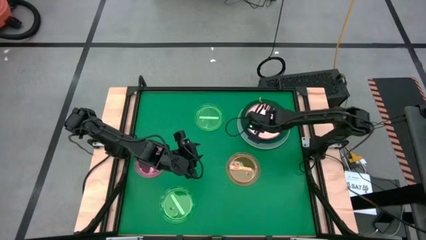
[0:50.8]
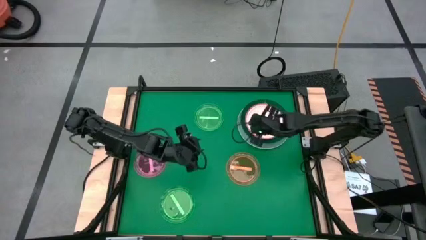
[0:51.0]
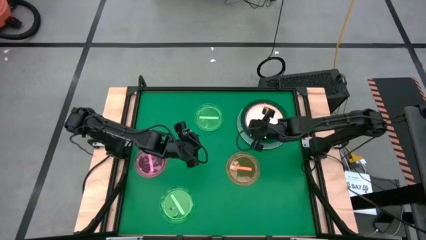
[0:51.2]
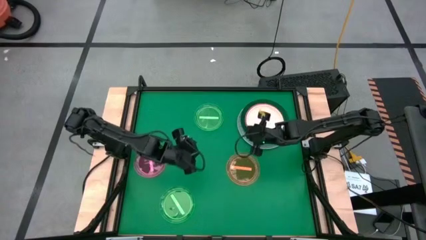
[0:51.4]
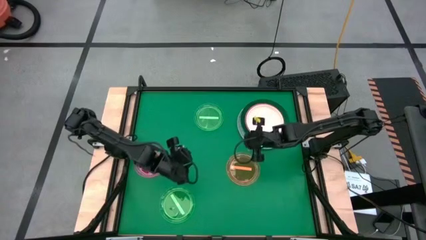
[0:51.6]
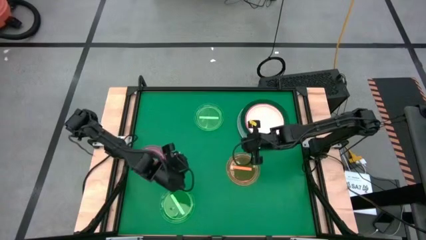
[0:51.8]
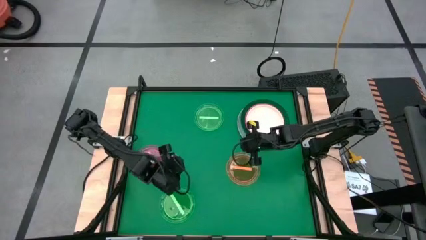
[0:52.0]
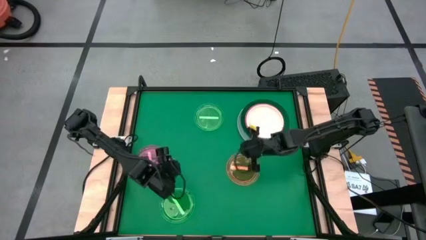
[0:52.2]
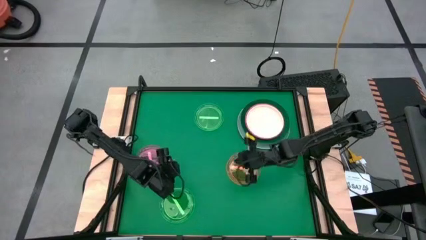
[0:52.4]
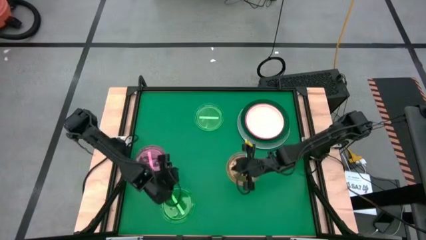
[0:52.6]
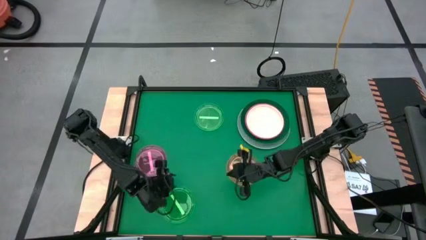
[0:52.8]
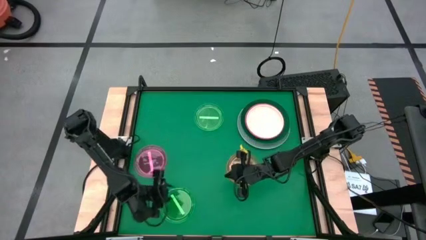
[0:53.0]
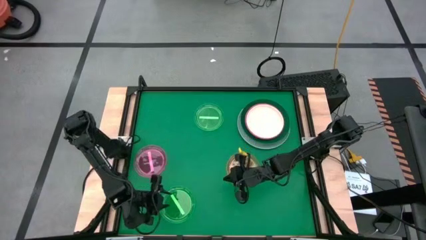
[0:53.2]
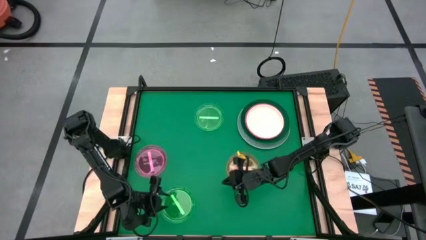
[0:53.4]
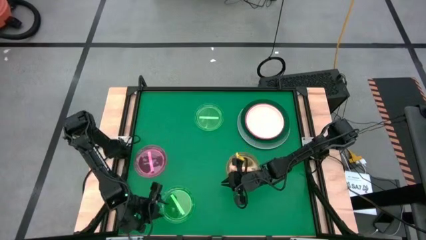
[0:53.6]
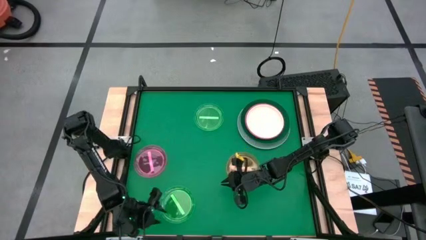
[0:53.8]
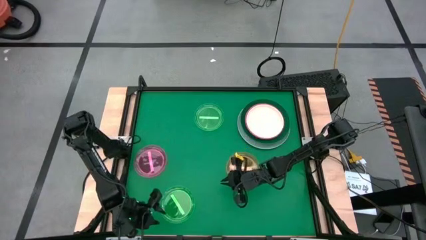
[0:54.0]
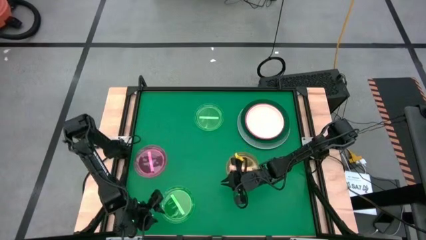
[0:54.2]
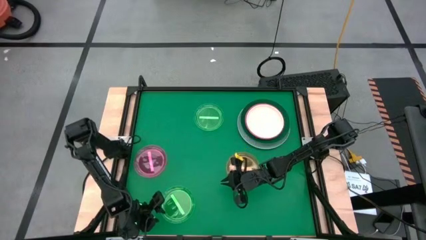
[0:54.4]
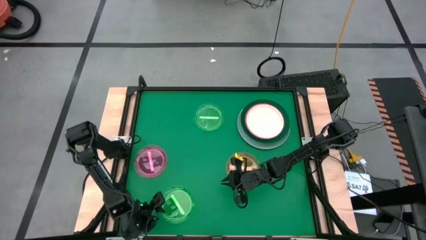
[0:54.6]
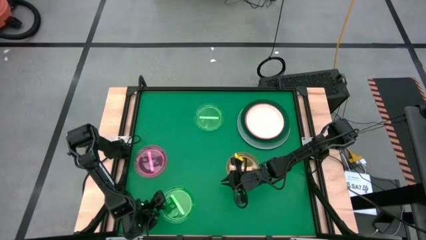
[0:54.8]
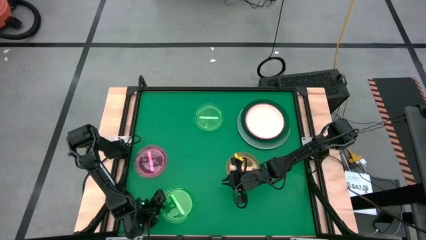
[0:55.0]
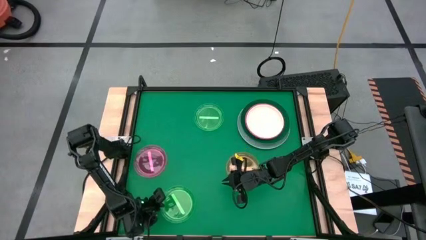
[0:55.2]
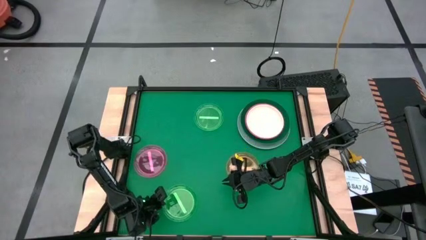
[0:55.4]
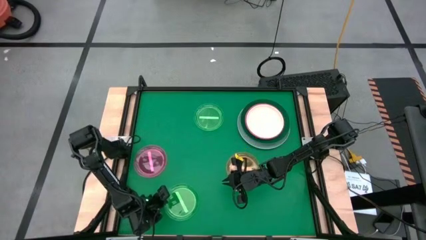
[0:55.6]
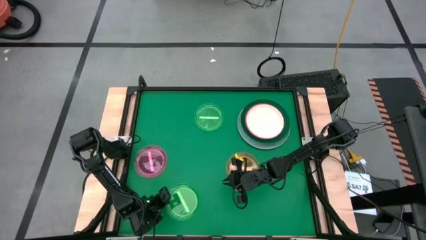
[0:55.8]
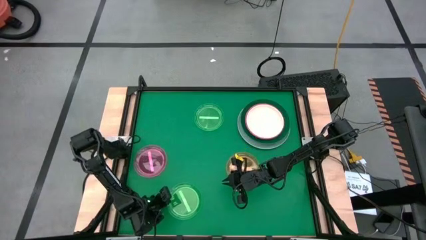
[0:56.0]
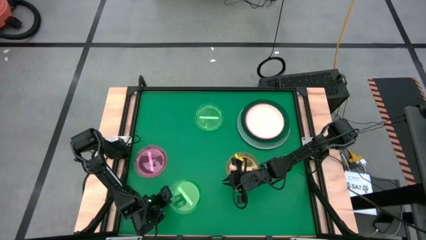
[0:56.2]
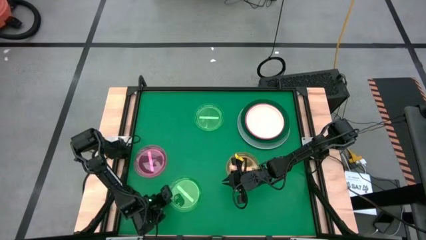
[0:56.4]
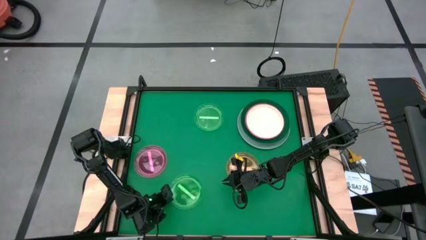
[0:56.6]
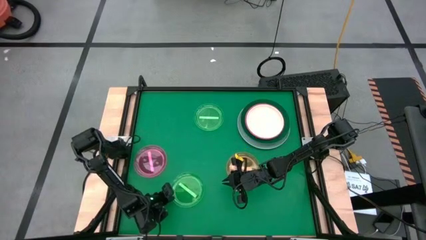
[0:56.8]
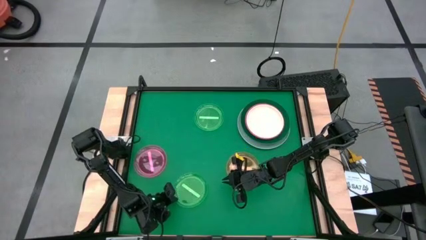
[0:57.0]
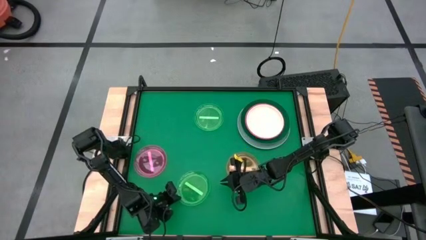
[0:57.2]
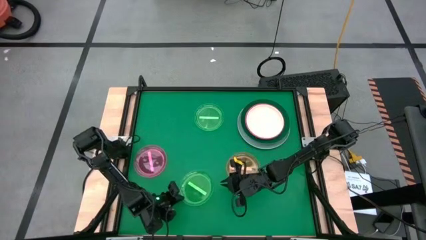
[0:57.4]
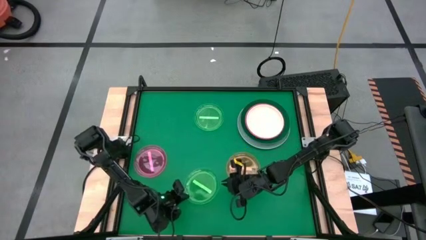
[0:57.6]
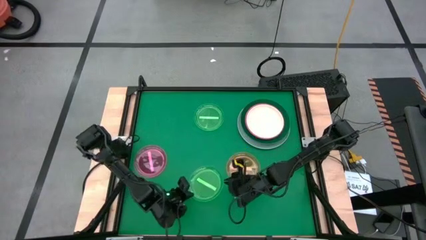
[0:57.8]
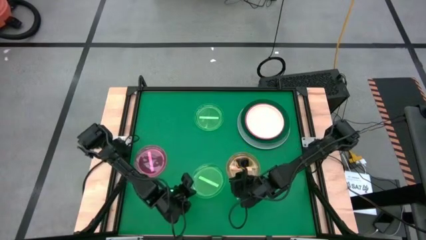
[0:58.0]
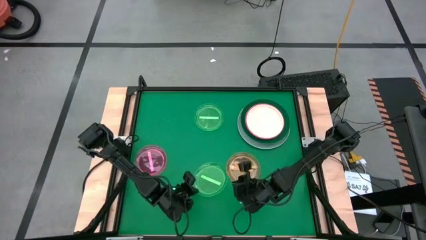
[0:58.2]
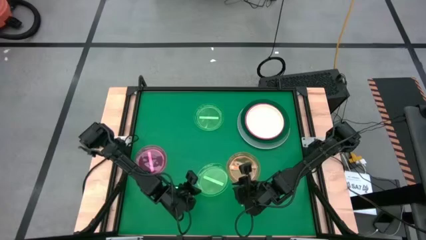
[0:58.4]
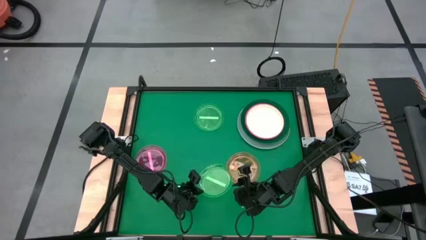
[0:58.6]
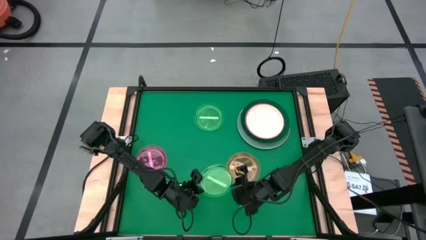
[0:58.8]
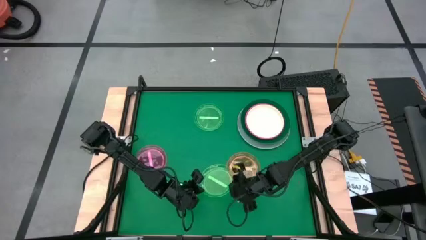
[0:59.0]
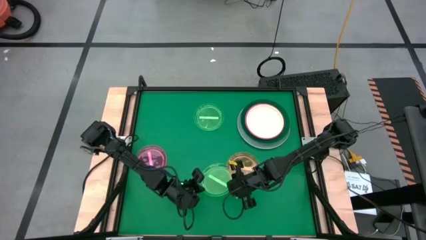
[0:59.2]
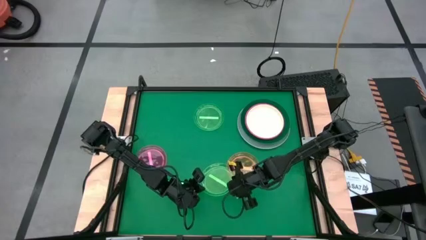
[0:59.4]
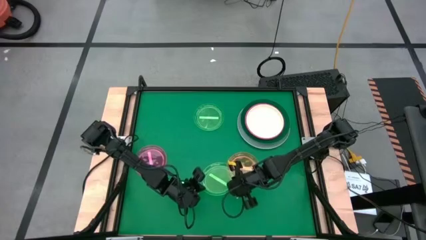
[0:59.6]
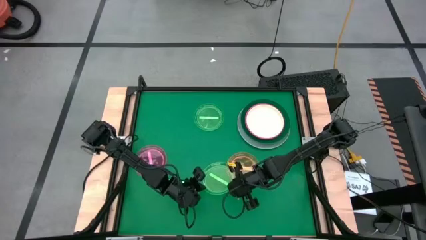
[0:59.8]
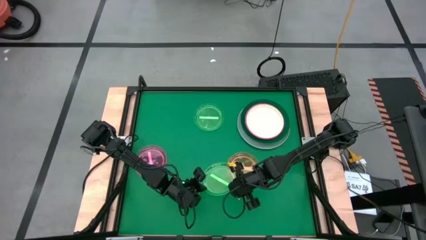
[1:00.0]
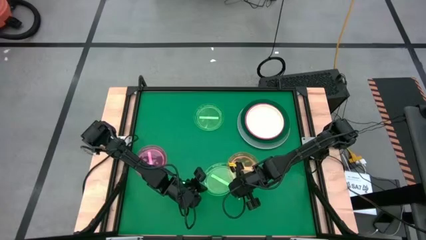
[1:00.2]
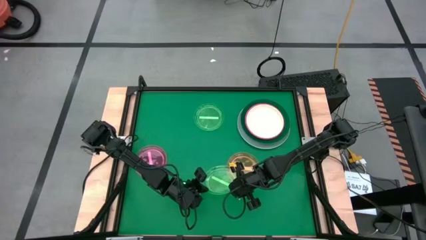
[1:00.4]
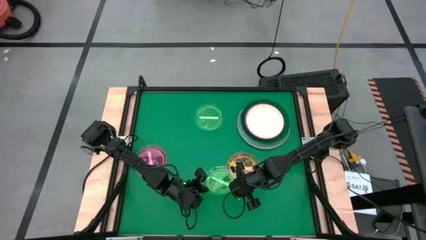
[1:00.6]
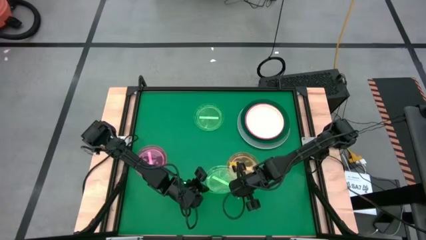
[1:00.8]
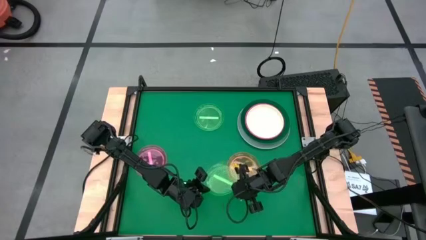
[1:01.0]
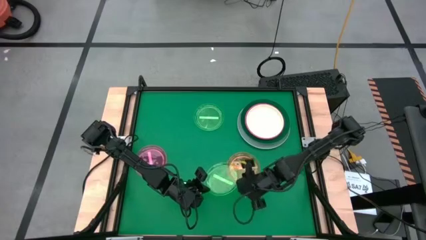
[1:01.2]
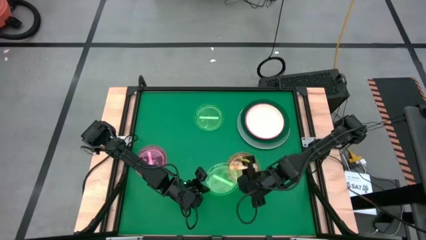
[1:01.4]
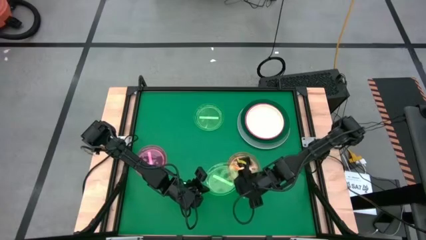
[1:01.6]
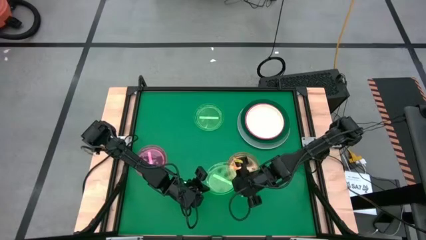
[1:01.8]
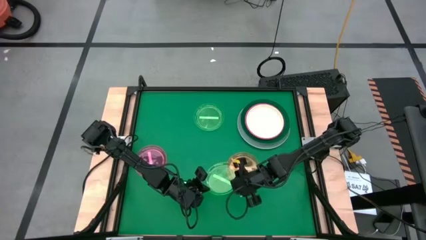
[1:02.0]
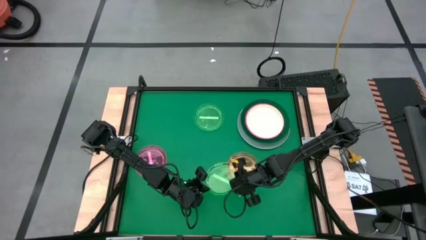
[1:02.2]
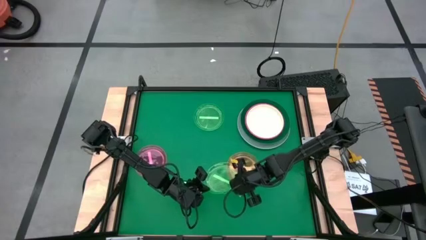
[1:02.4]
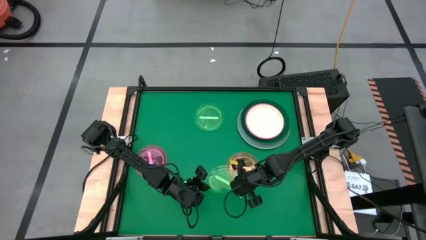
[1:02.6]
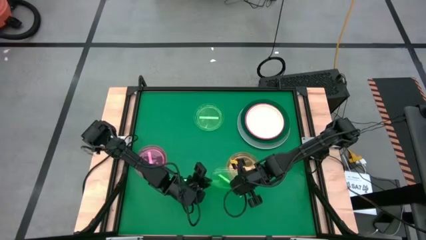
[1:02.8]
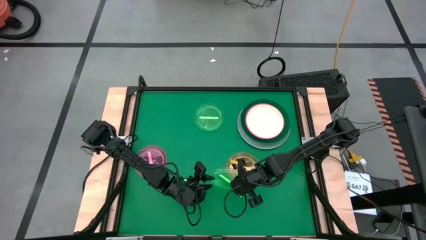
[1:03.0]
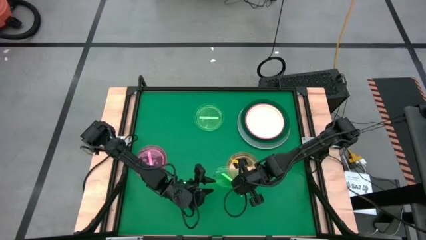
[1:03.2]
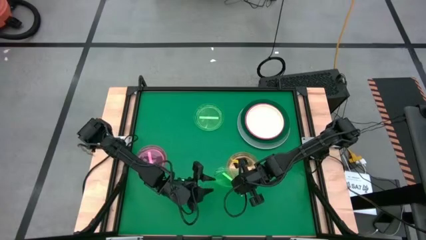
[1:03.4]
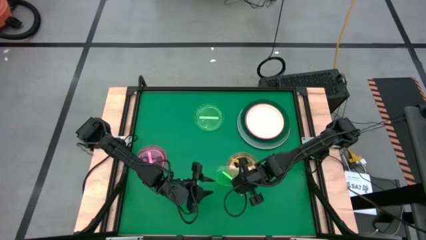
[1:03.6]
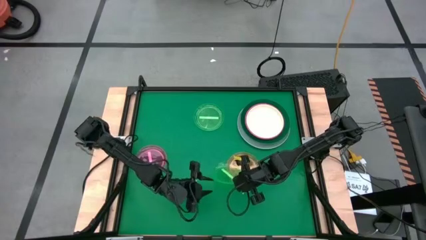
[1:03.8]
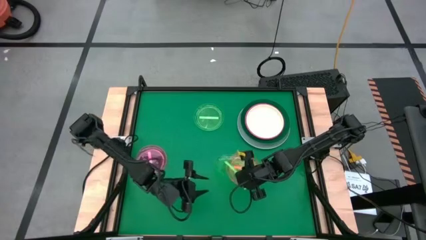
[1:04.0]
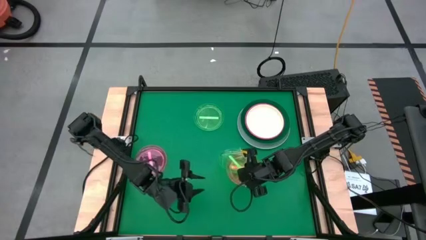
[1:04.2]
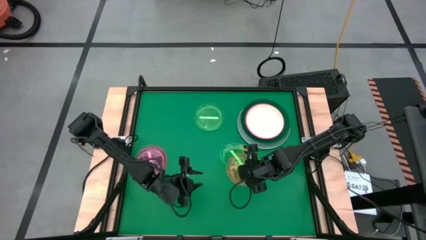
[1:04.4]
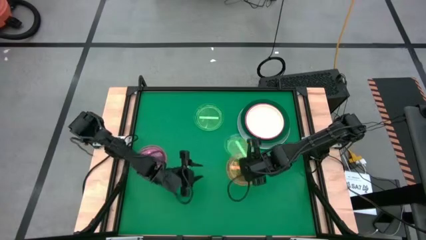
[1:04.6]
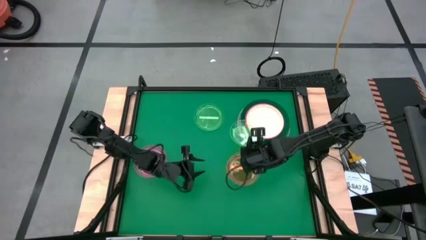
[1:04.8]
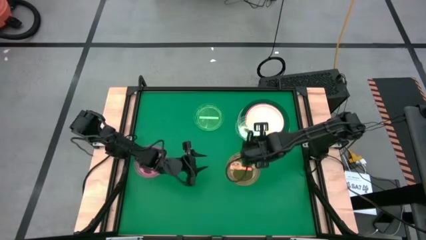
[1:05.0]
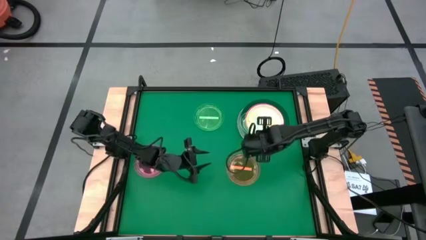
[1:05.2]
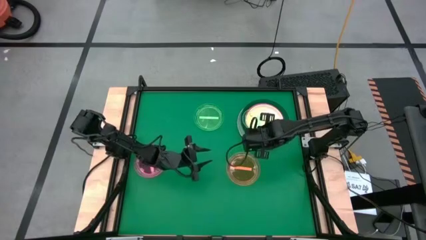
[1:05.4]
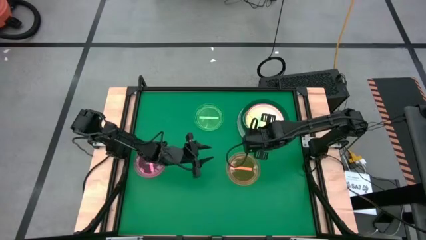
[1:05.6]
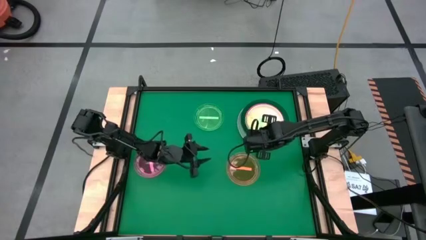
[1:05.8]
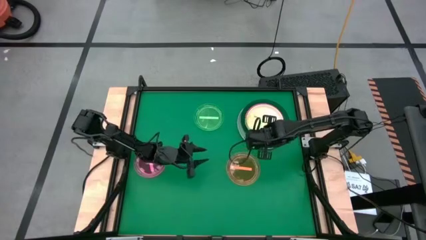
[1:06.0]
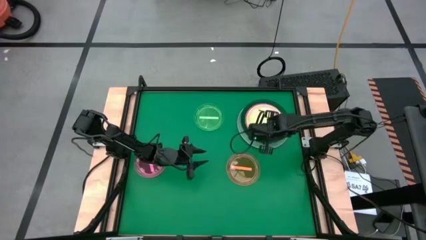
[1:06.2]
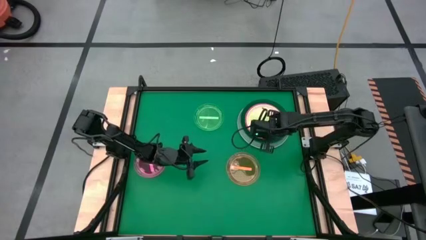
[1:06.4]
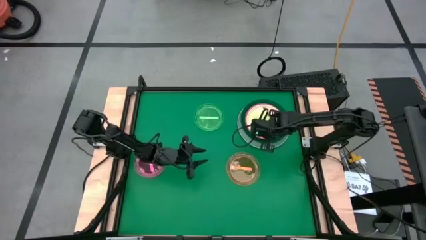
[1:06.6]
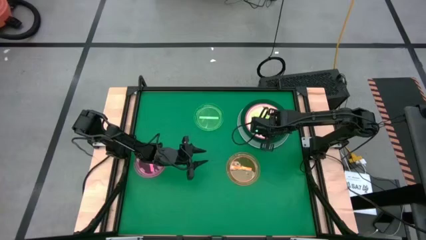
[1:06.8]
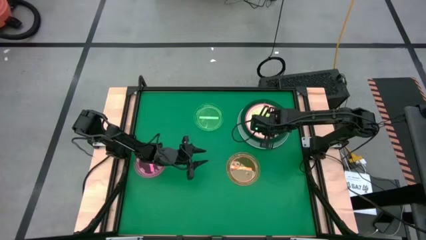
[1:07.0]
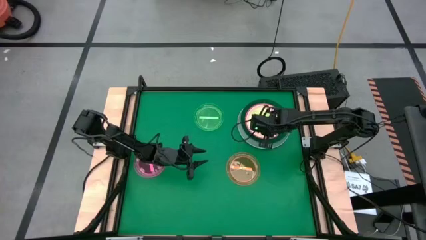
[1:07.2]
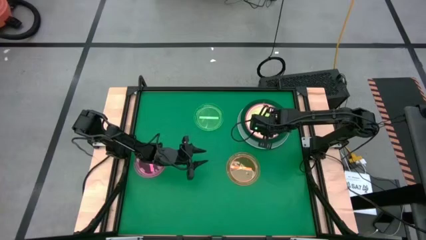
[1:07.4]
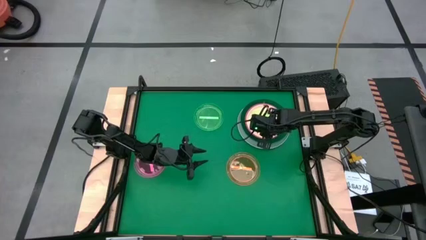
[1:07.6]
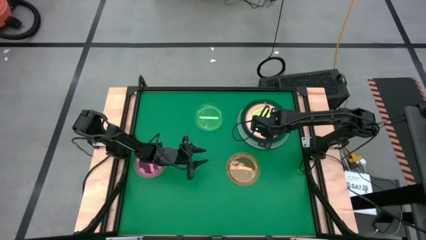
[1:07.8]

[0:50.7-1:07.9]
Task: Stack plastic plates
Stack the green transparent plate on the white plate
